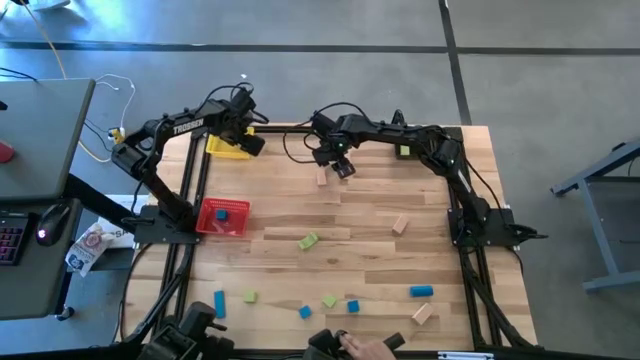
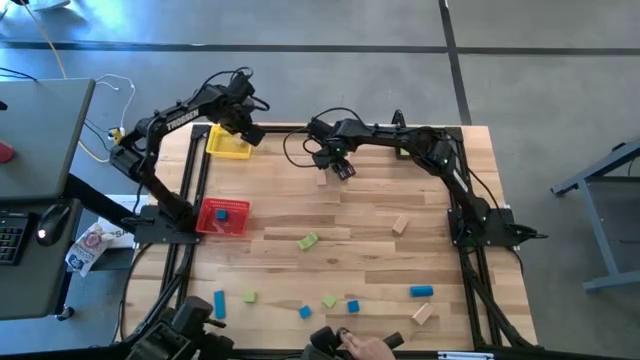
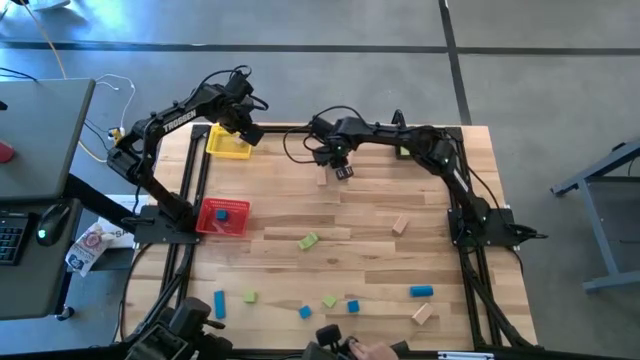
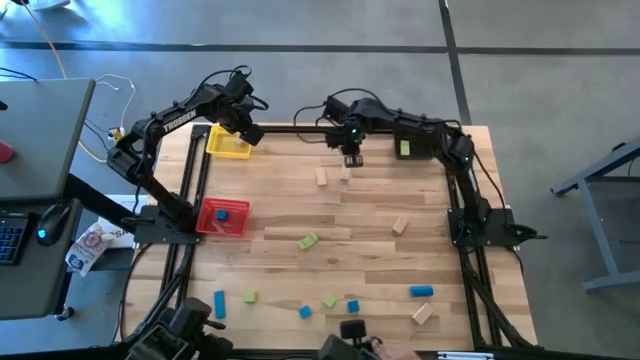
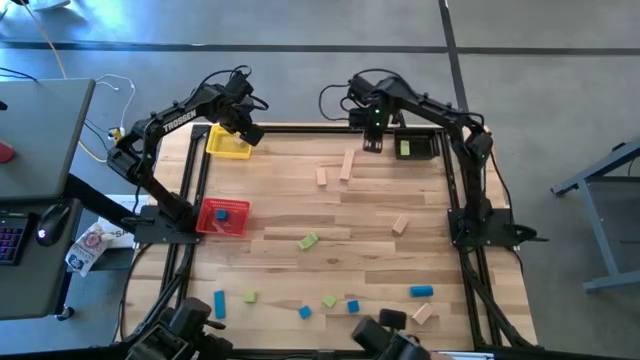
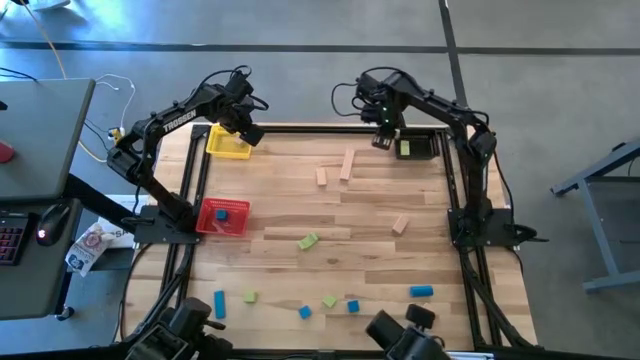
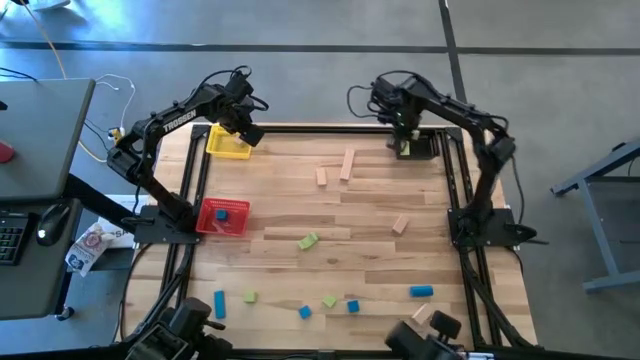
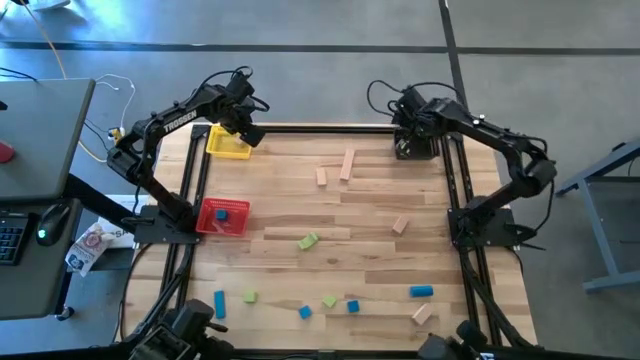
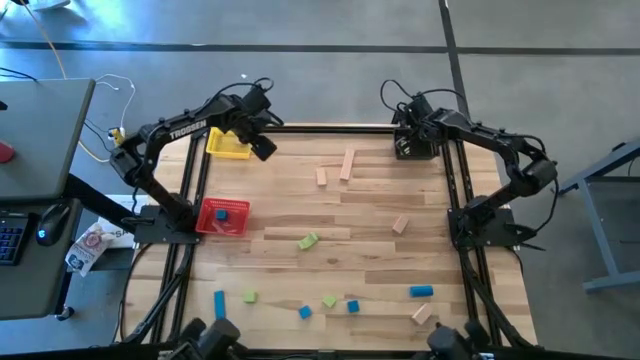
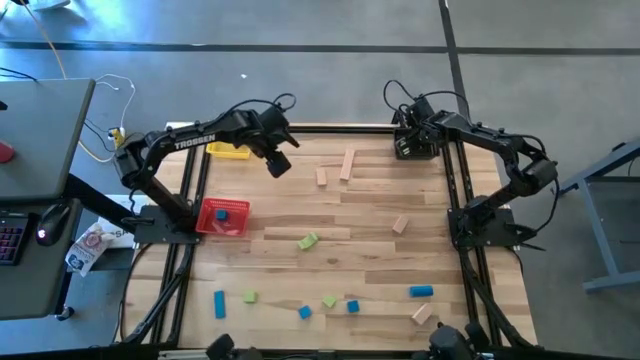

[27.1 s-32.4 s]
Task: Sort & place blocks by color
Put the green block into the black bin

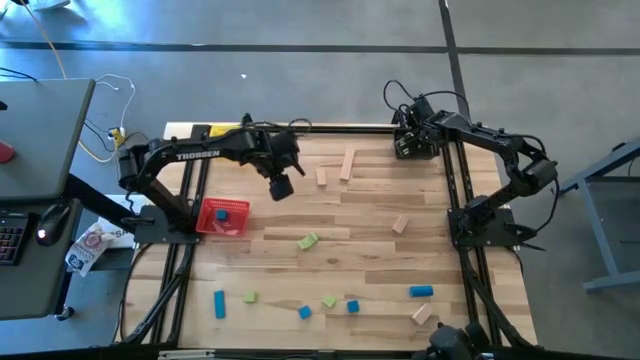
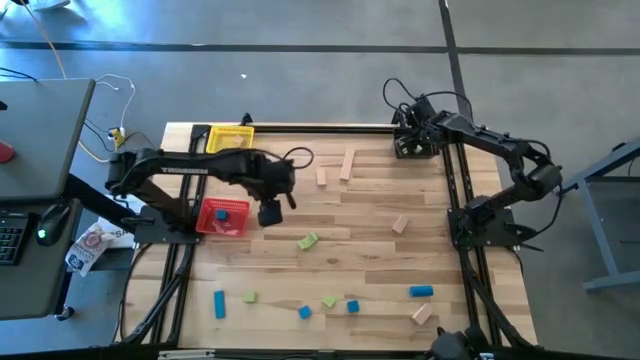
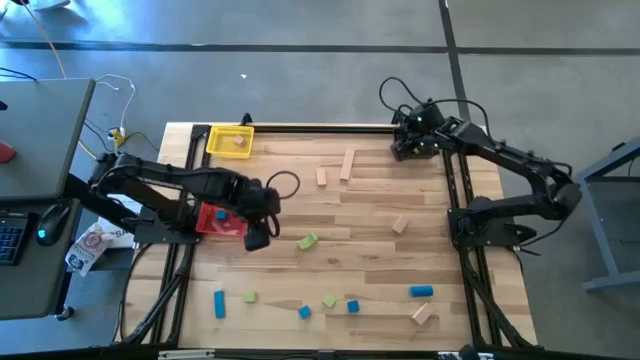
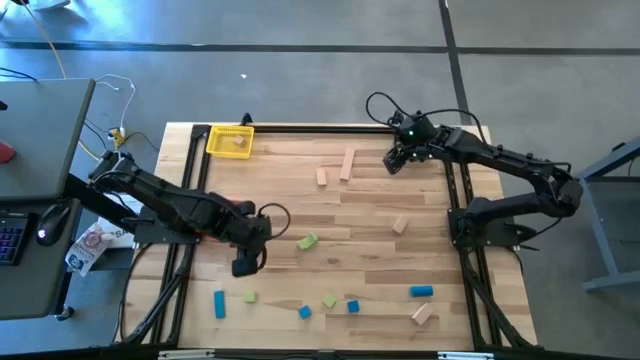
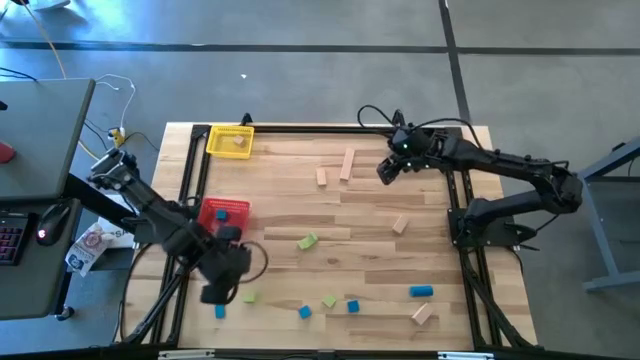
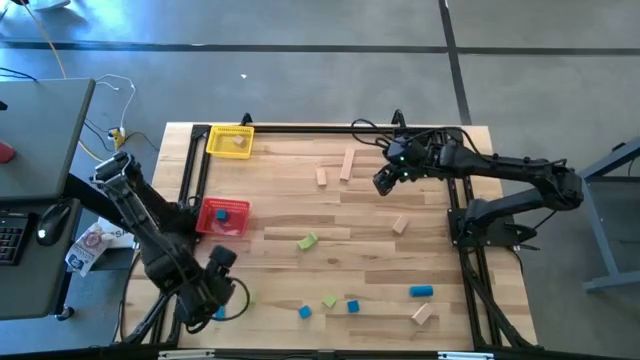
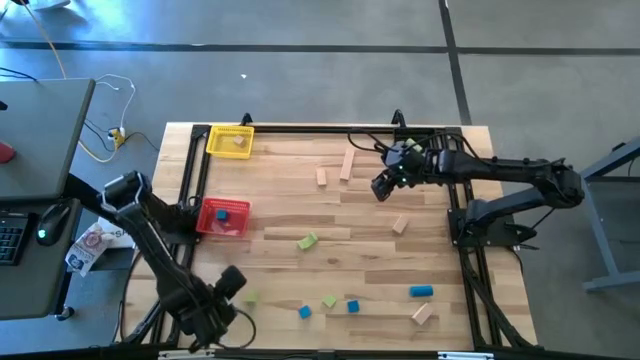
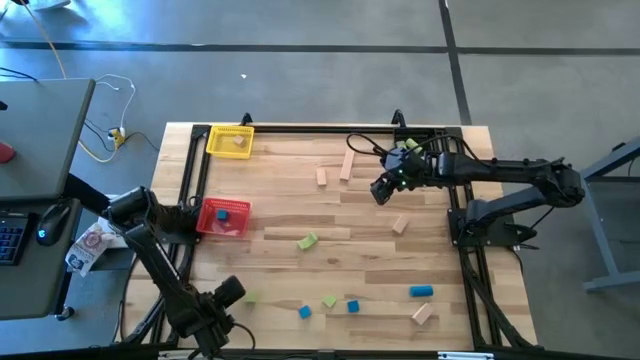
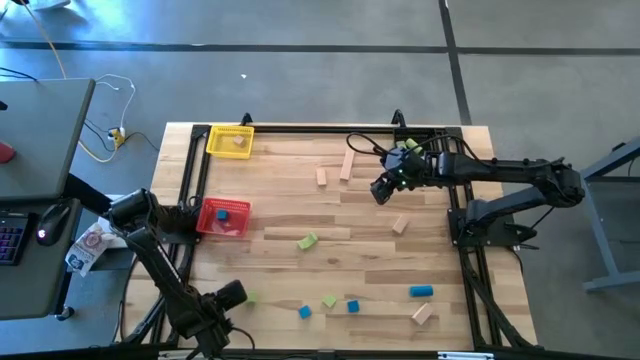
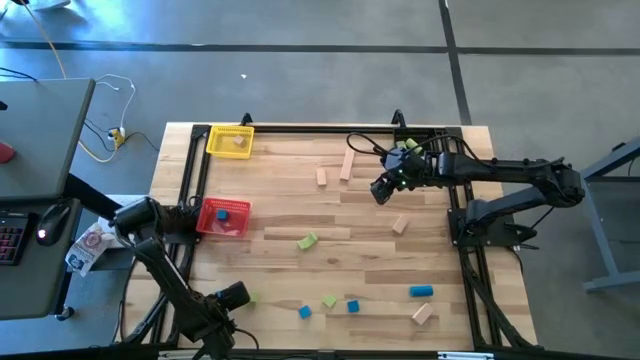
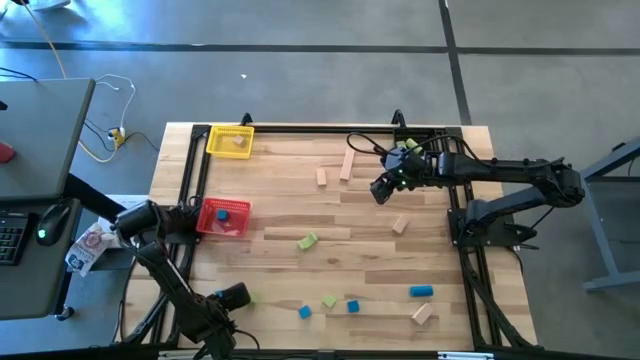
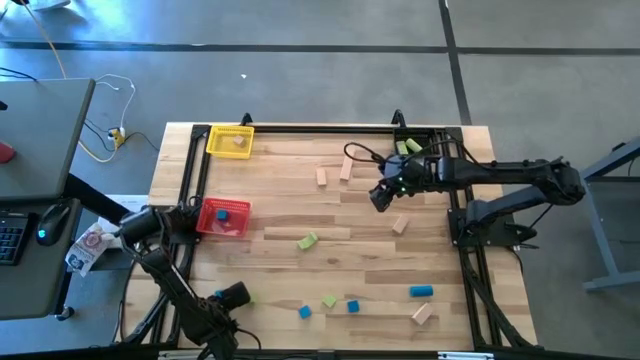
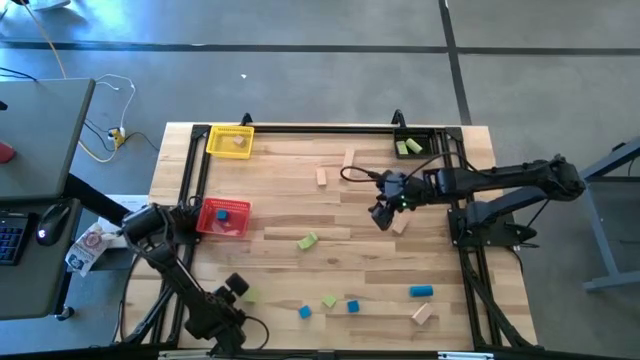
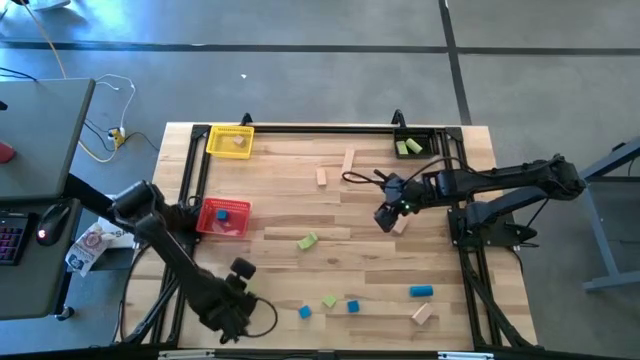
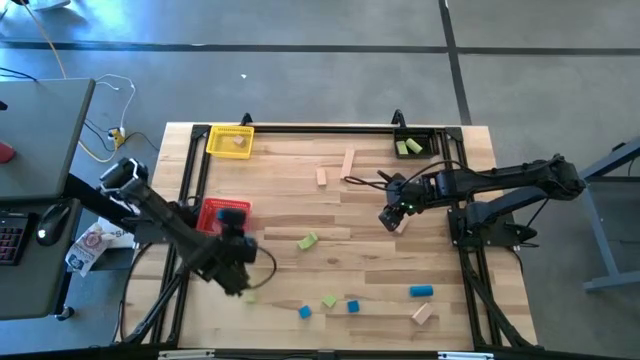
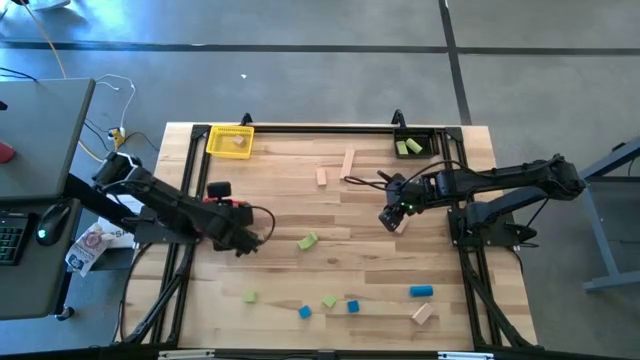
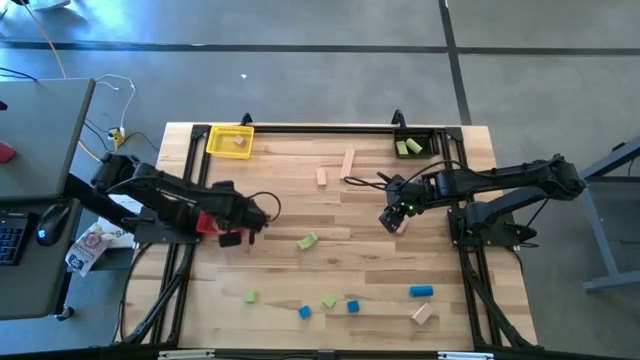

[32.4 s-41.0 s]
Put the blue block into the red bin

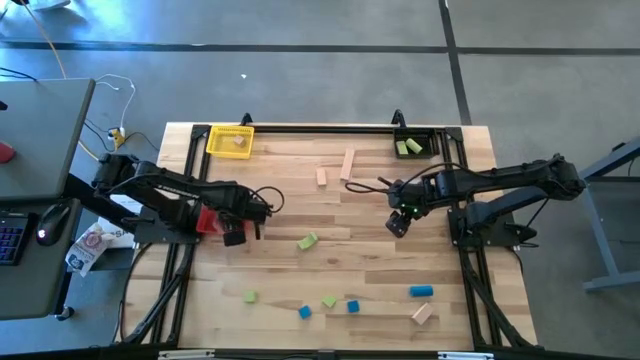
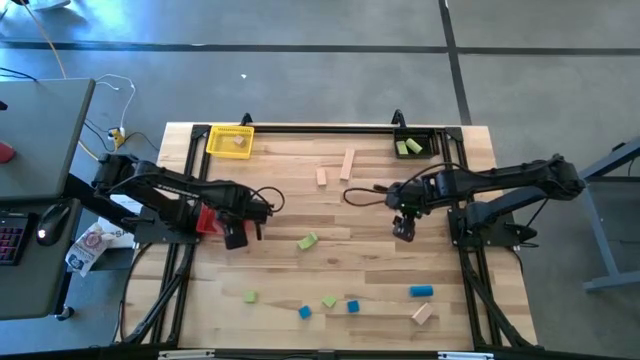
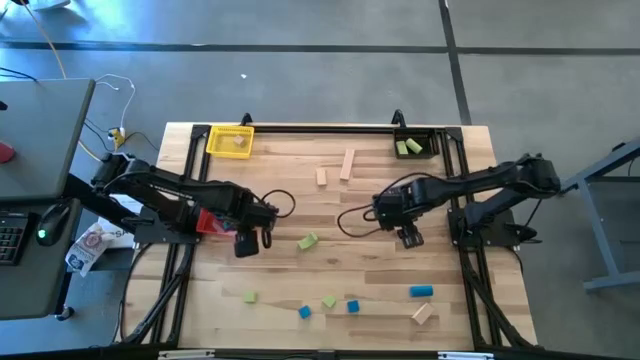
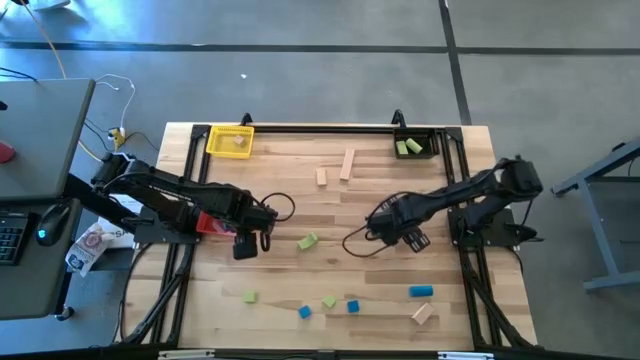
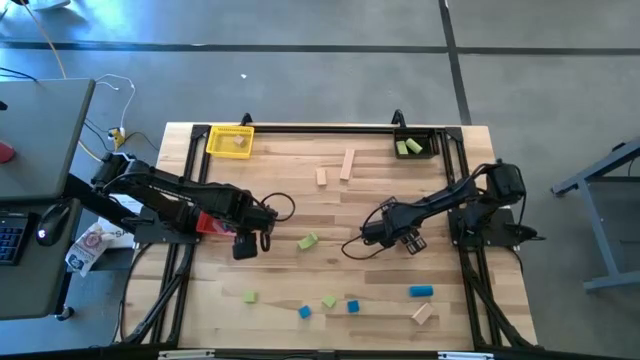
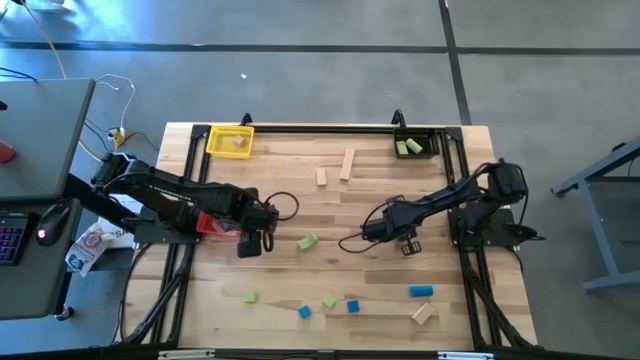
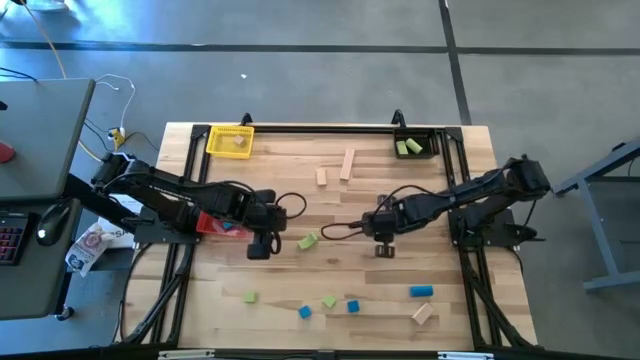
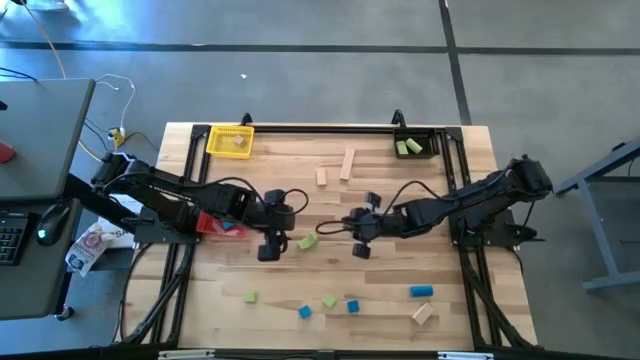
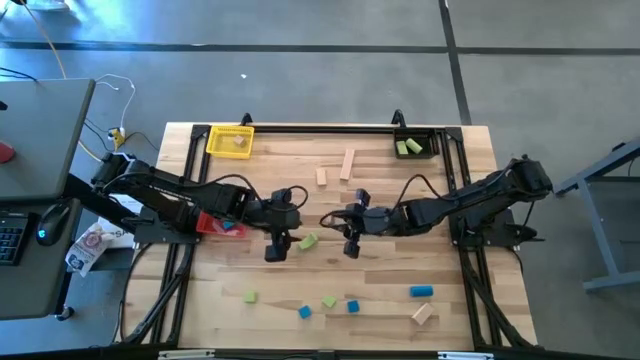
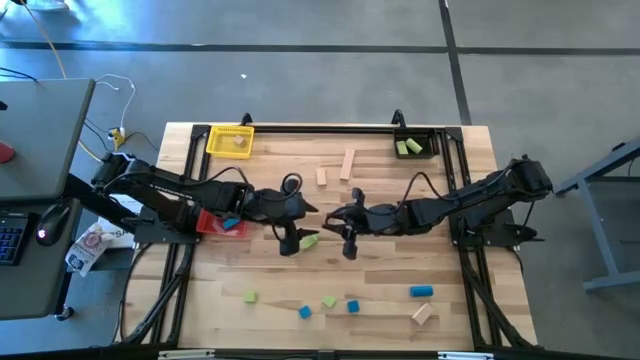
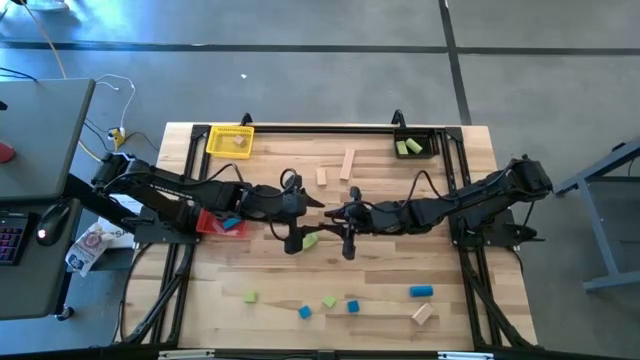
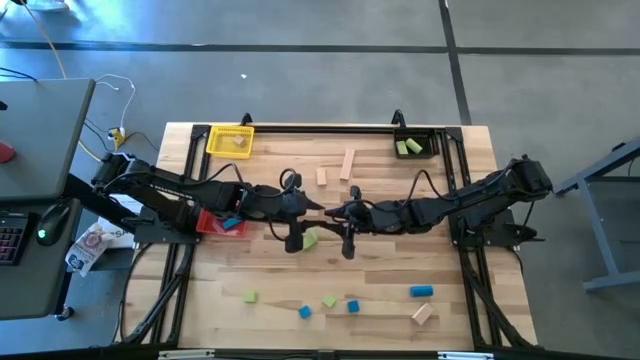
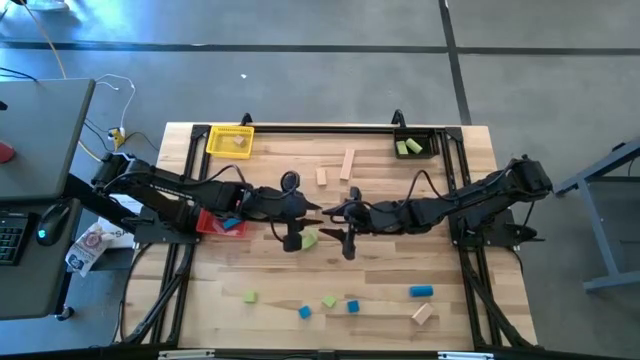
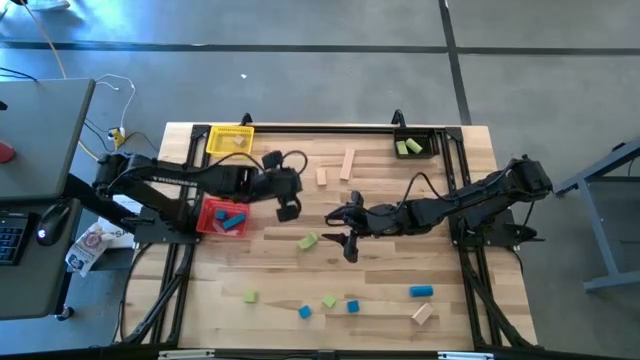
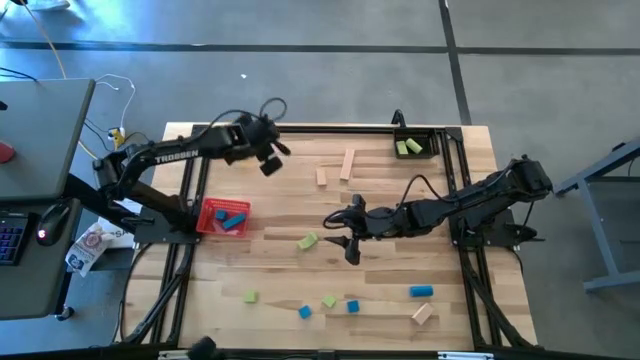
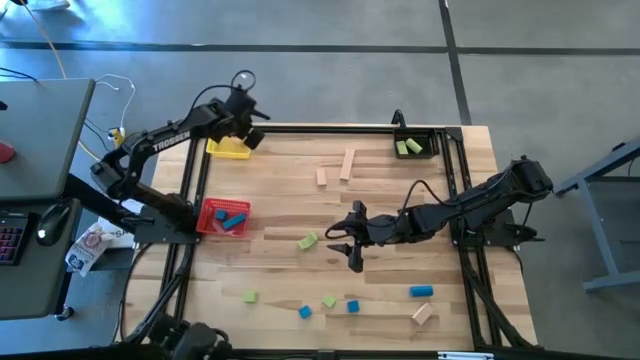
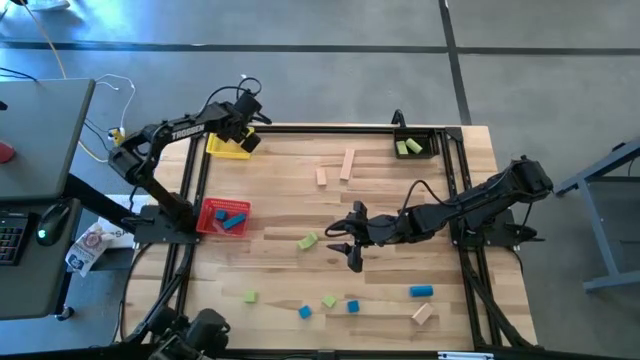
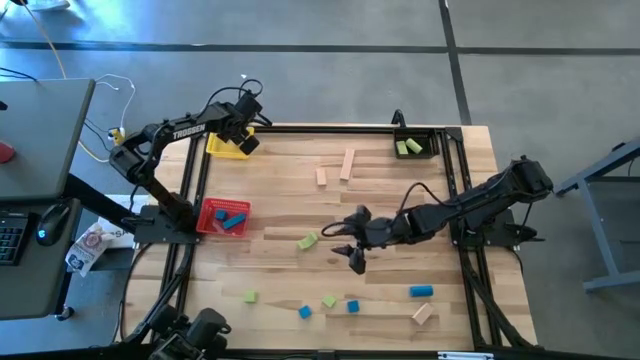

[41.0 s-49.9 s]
Put the brown block into the yellow bin
